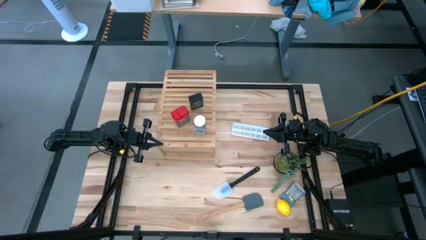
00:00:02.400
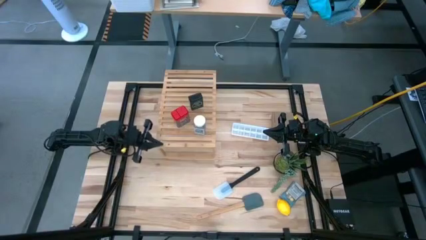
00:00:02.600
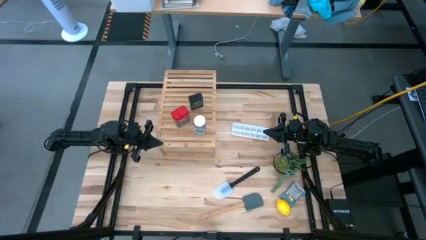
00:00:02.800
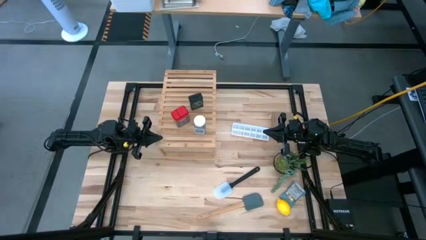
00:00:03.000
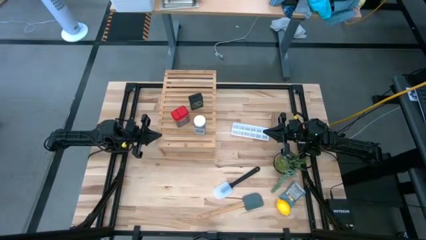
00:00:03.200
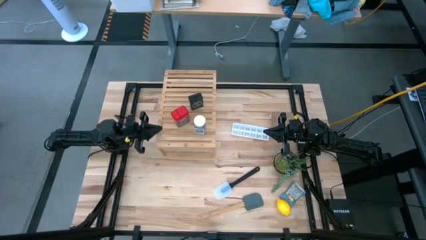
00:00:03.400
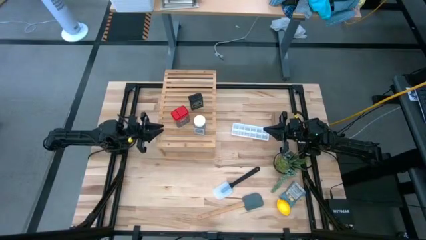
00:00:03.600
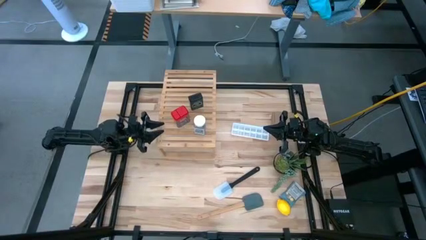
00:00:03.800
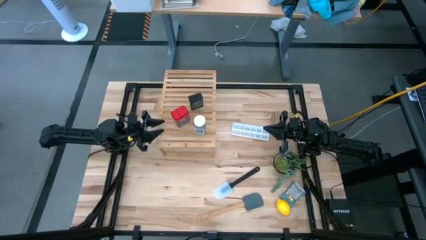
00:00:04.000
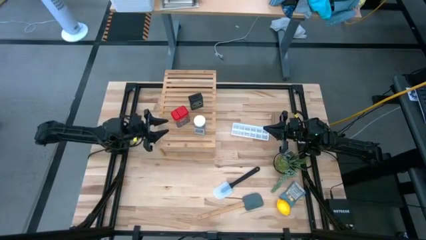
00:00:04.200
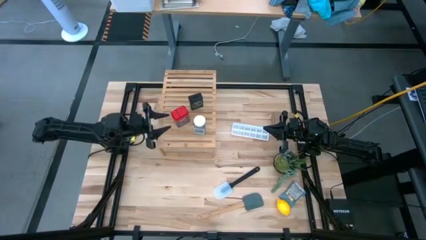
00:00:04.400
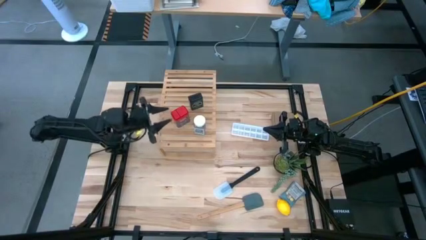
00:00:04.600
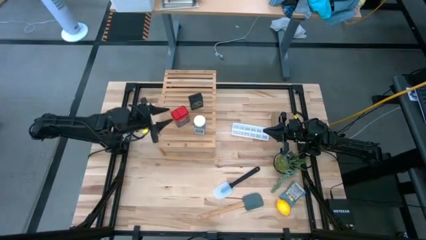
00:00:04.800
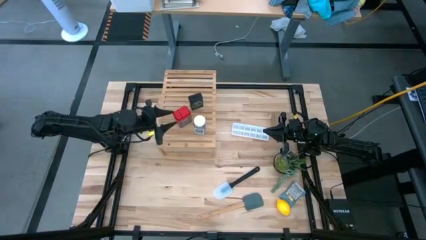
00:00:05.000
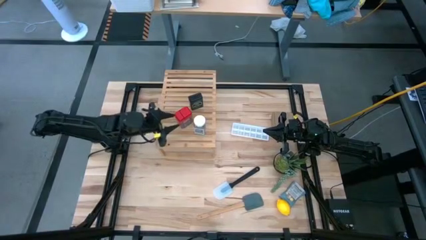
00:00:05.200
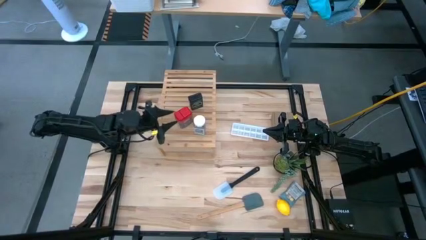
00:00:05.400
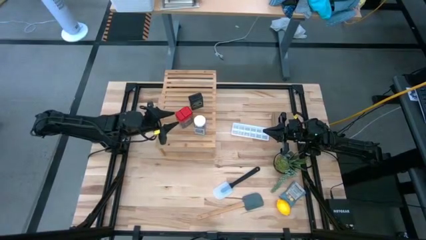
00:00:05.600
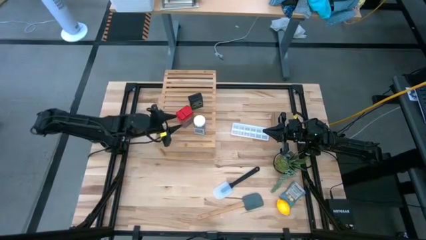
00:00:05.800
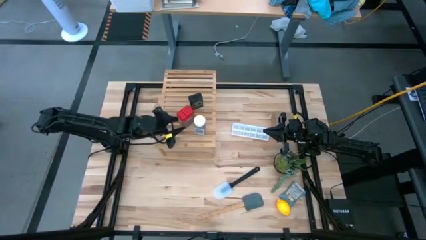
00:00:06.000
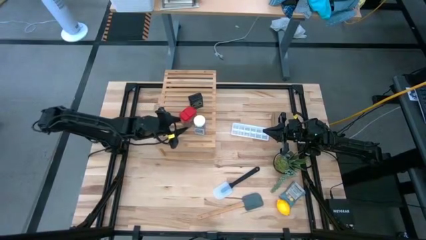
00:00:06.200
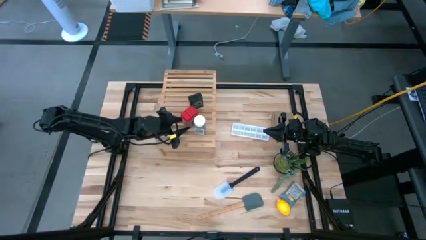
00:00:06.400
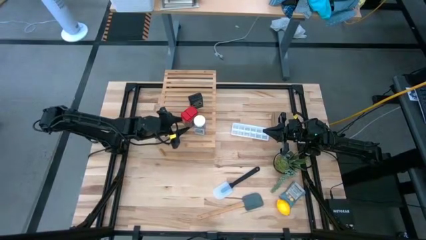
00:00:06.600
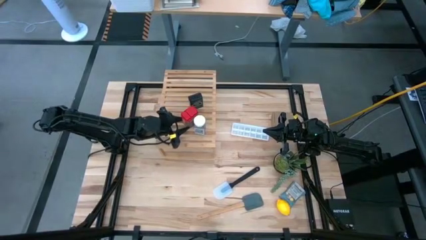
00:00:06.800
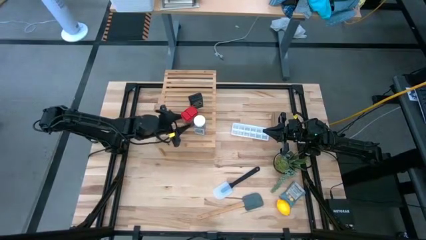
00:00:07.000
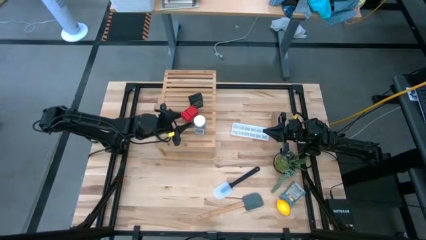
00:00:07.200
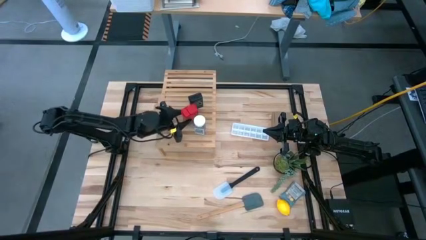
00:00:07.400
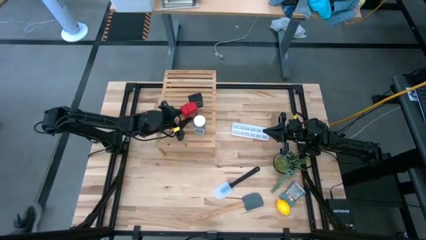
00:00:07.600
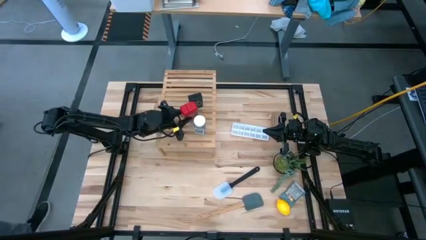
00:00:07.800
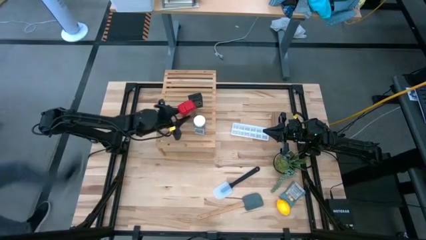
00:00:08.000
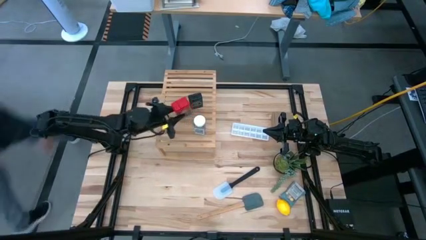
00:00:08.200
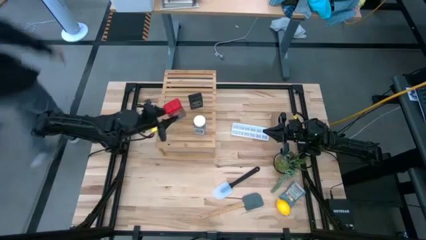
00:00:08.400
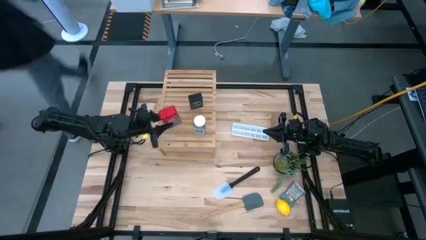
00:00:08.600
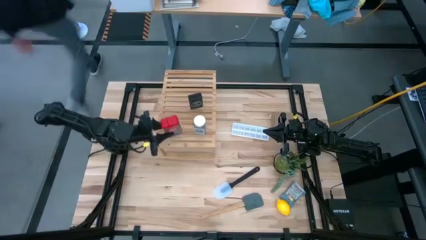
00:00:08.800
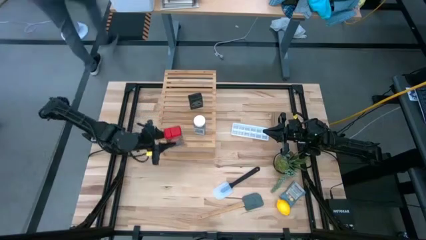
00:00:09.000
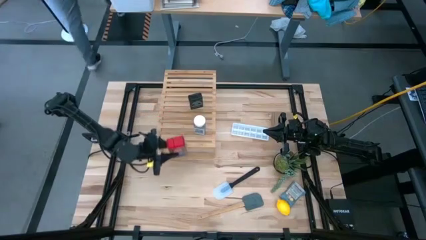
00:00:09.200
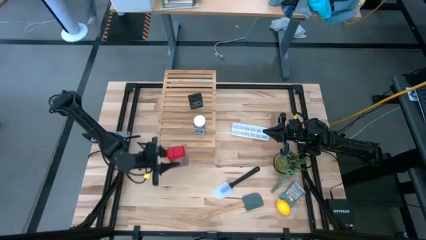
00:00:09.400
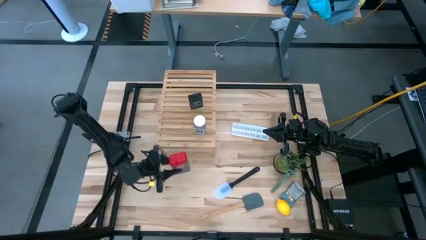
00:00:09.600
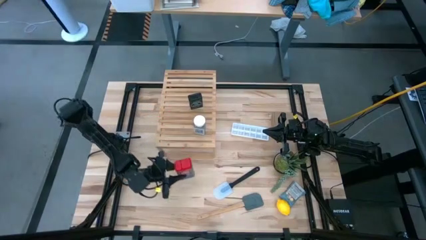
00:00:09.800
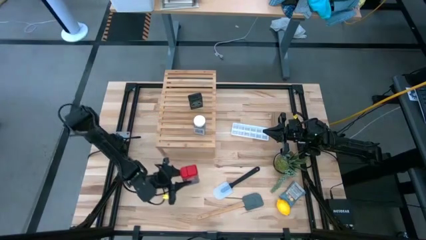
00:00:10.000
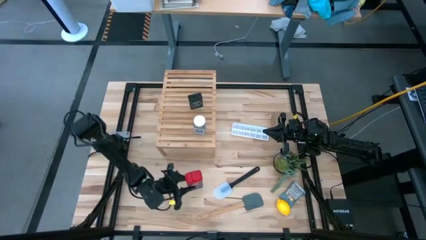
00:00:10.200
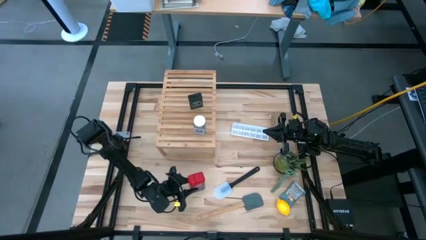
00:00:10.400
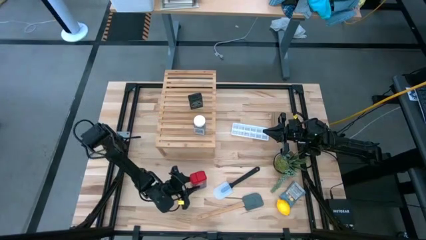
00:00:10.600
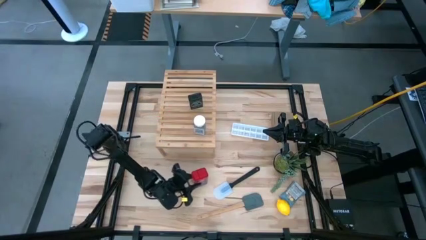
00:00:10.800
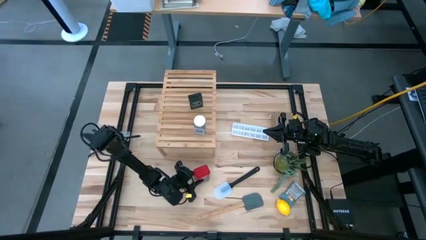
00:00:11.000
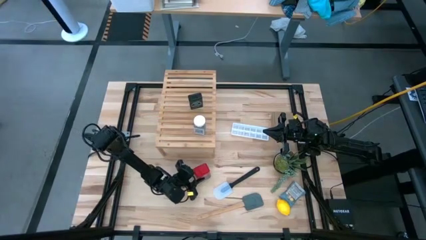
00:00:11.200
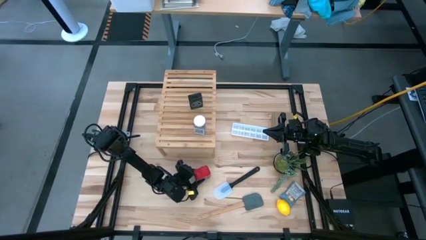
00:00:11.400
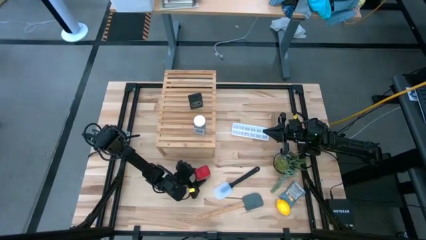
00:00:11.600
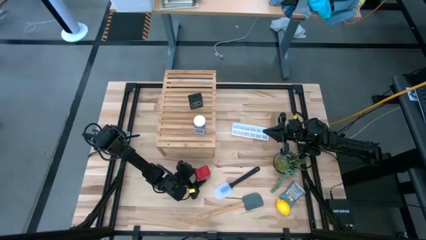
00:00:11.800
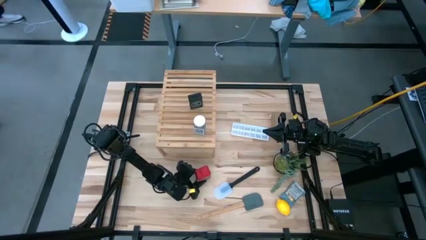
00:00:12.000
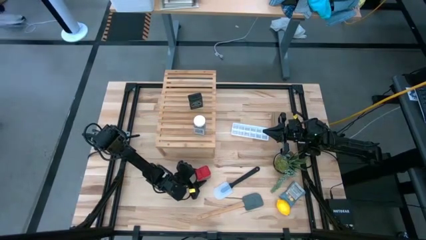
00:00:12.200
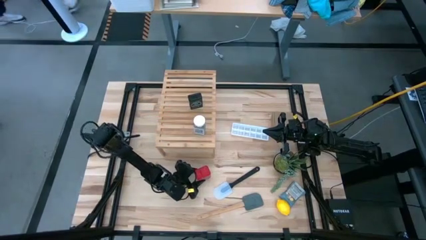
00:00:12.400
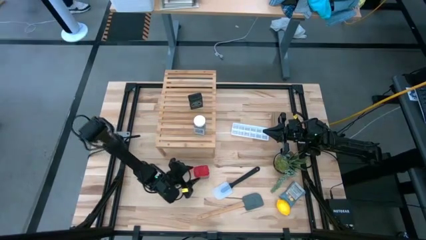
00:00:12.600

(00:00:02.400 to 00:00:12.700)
Task: Shelf spices
Remove the red seasoning can from the shelf
